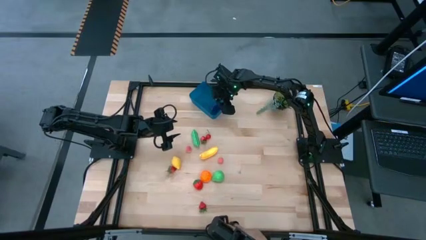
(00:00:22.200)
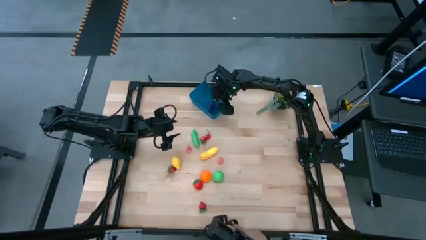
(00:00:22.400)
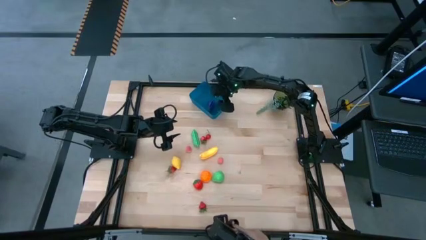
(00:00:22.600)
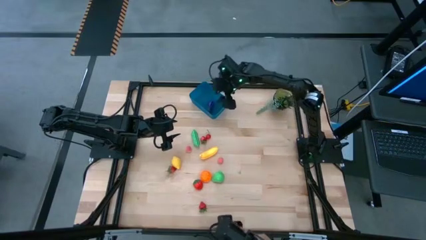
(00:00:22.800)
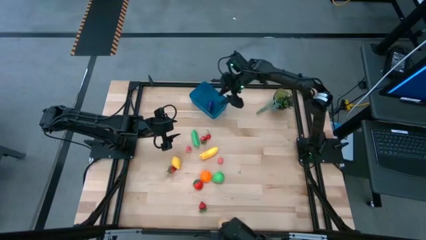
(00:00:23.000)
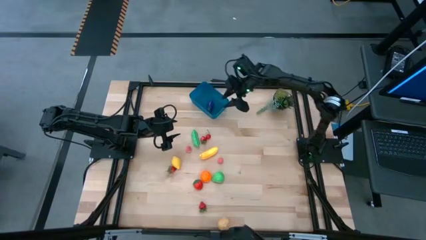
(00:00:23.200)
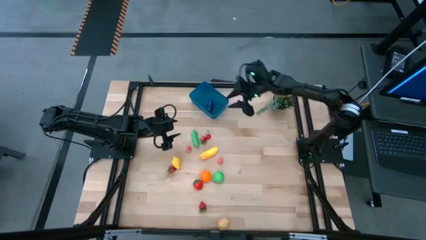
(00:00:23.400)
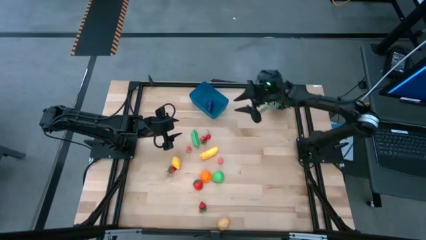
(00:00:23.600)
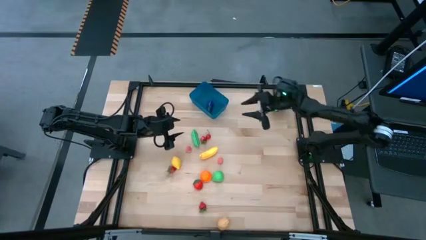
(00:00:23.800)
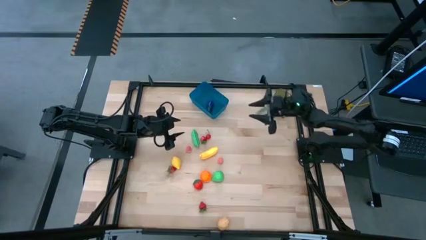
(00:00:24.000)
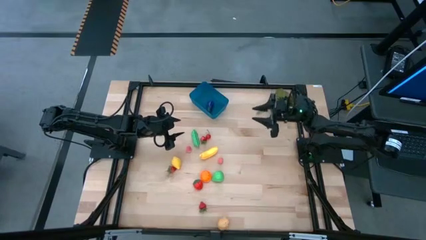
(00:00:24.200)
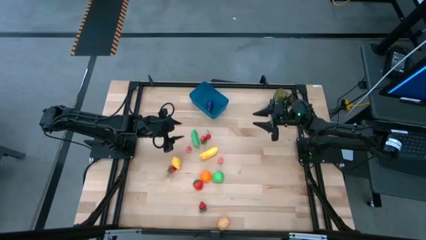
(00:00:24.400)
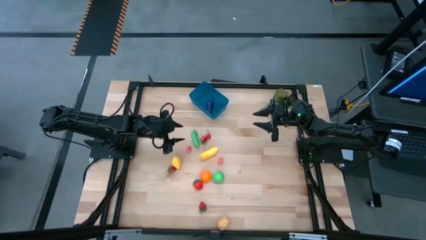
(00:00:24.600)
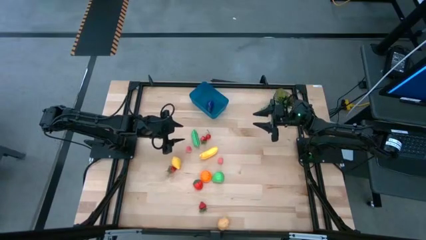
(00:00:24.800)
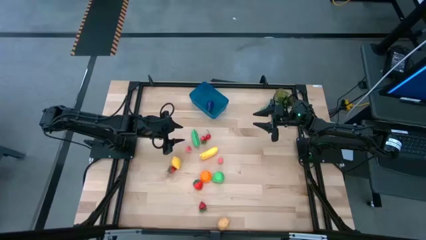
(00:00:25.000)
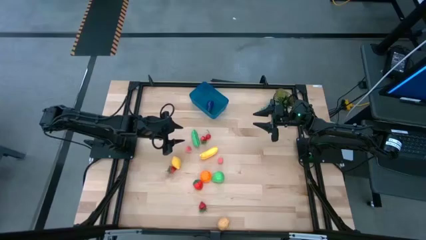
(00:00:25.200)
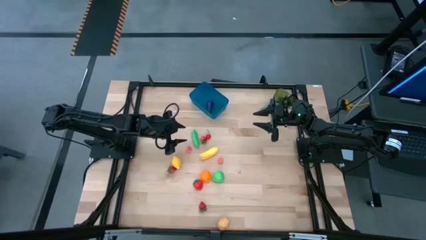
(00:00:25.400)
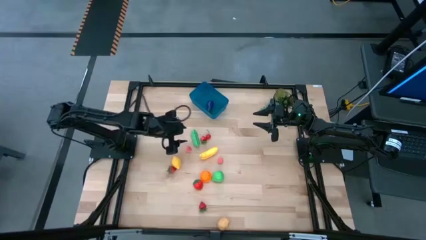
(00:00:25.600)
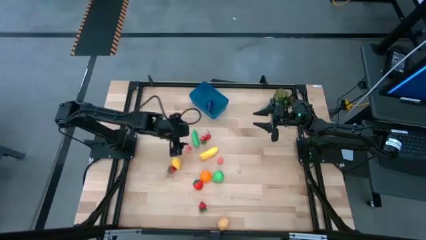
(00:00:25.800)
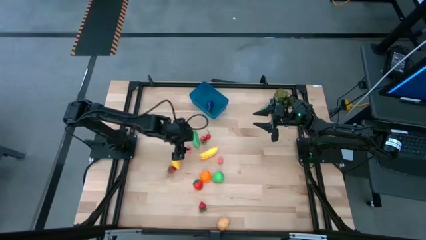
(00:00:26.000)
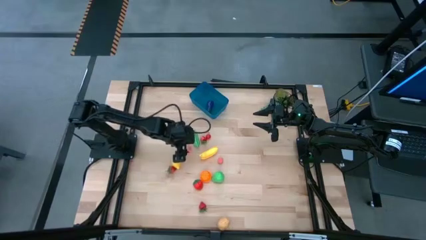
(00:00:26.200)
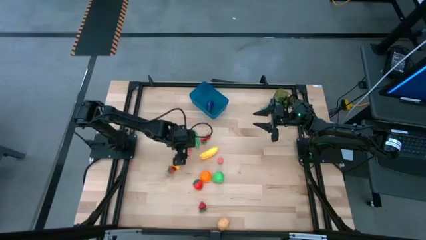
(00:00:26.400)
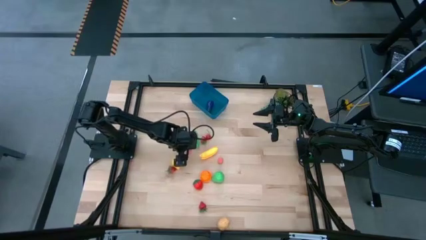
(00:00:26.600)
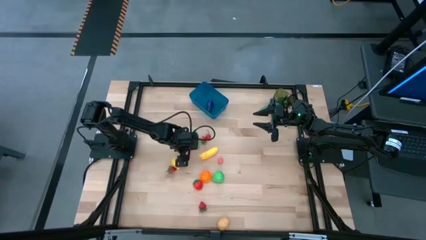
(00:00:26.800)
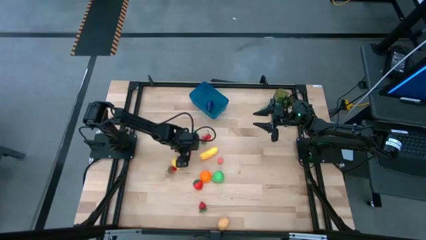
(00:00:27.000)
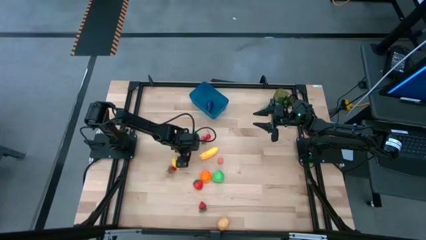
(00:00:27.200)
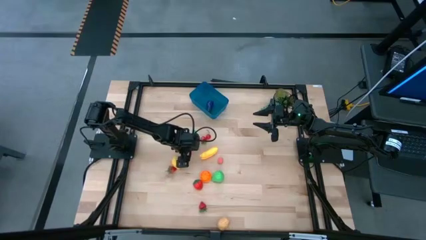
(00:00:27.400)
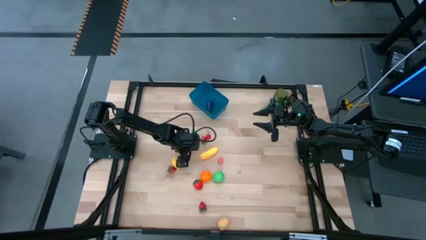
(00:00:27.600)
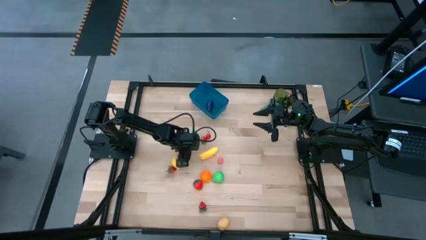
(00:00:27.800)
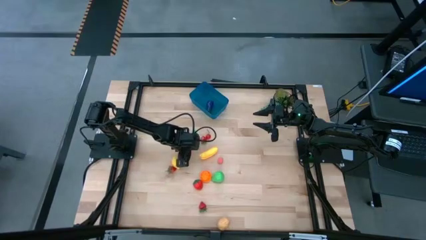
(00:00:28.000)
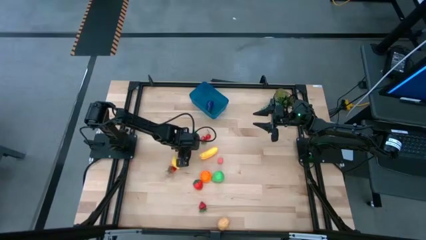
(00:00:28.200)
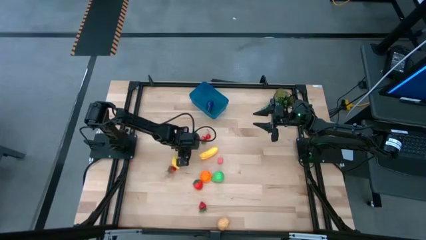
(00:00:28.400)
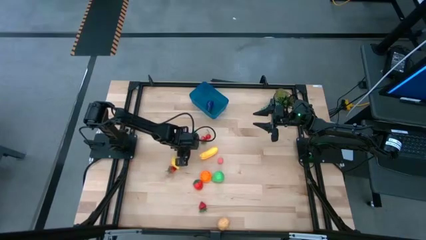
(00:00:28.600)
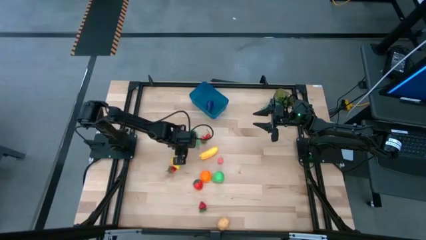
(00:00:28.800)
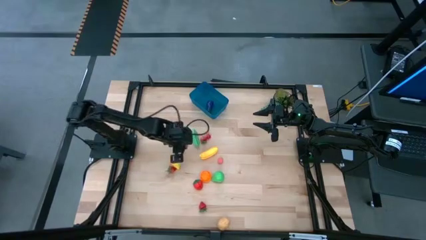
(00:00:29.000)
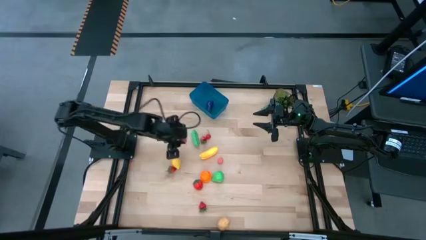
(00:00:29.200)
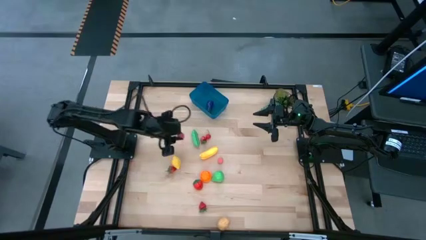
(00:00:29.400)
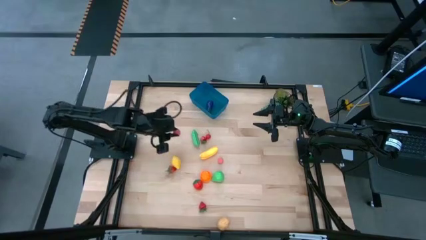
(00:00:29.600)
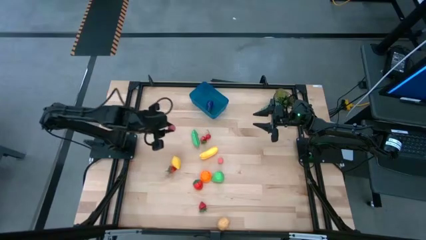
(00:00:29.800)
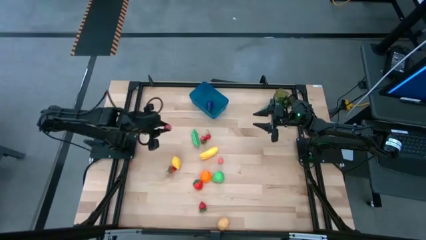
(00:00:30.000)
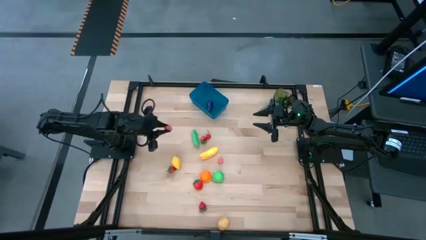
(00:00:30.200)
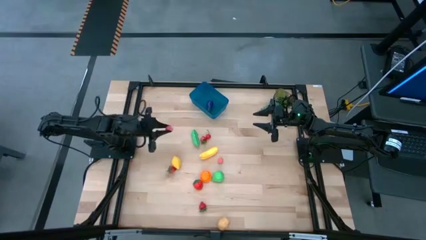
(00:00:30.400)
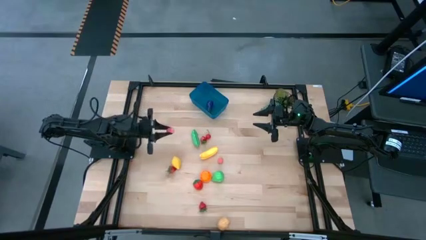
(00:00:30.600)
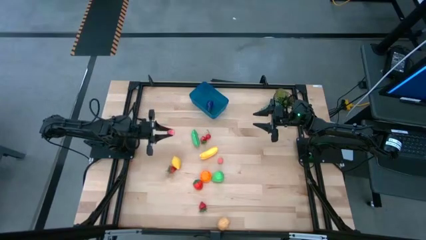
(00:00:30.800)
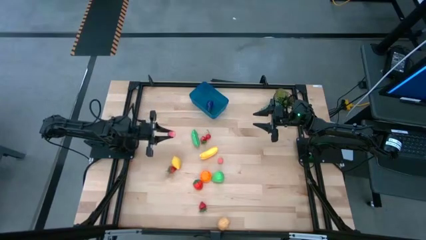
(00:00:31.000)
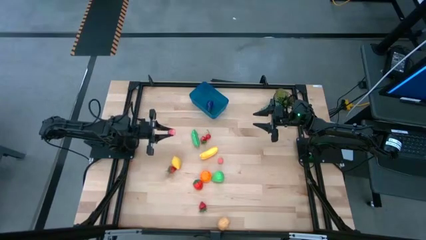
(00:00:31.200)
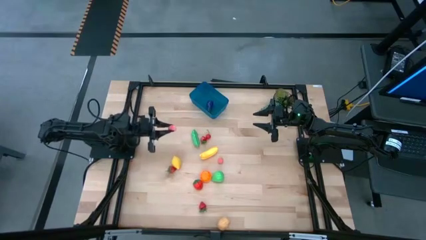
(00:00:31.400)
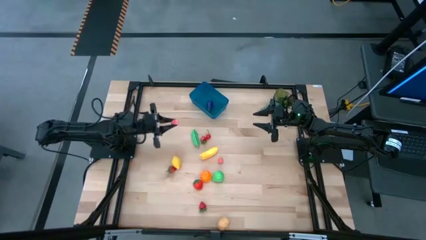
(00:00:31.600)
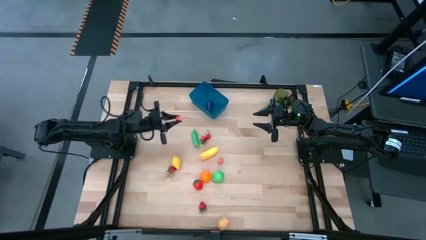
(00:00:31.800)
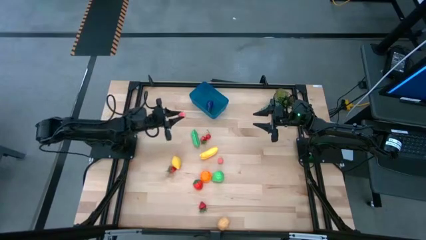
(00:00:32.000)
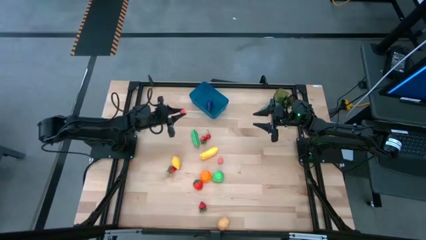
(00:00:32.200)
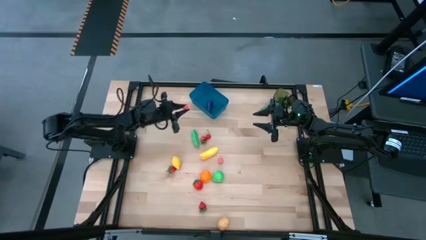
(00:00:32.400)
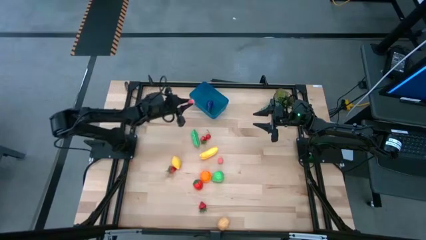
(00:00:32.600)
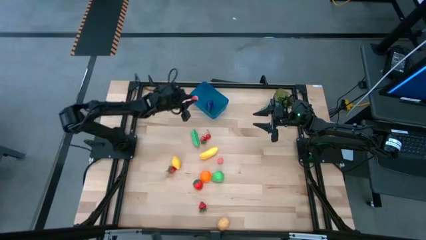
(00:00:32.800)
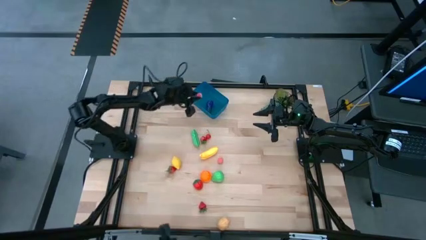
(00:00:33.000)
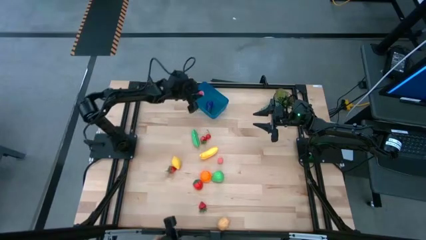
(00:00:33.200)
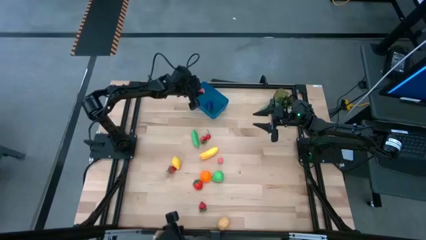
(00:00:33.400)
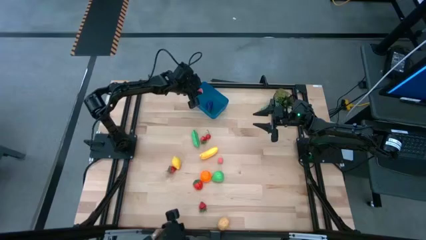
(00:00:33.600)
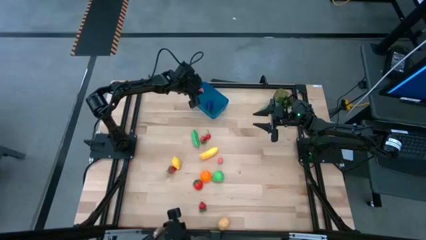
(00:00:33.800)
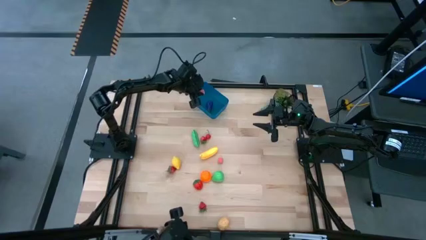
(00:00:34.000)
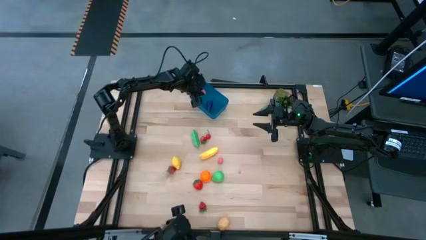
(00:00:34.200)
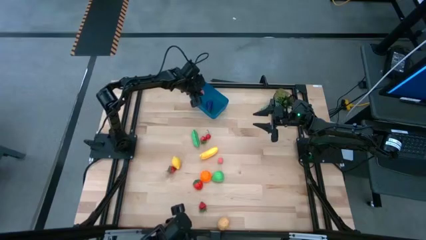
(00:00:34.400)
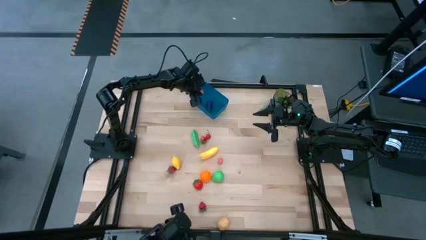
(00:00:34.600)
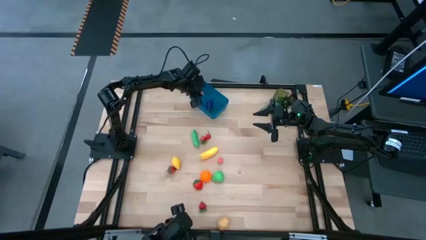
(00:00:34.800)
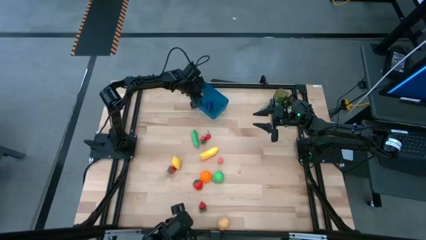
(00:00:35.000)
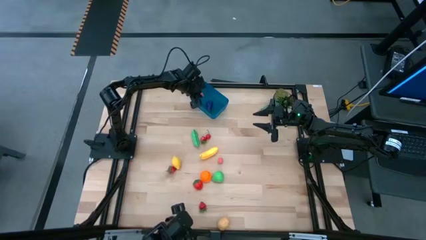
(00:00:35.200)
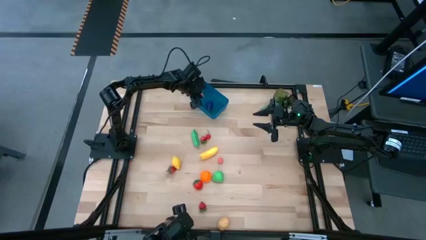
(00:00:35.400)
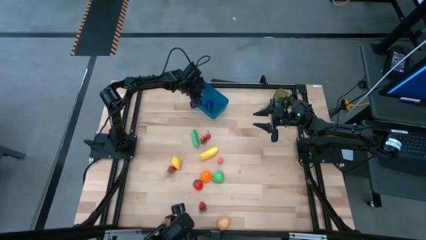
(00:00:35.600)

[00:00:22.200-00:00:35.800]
Task: Pick and placing Produce into tupperware
Put the pink peach into the blue bin
